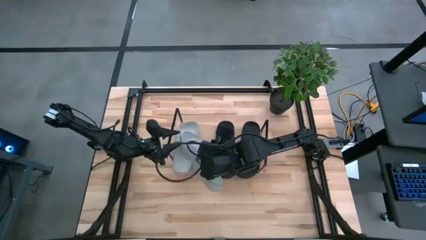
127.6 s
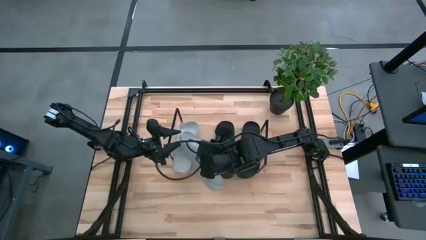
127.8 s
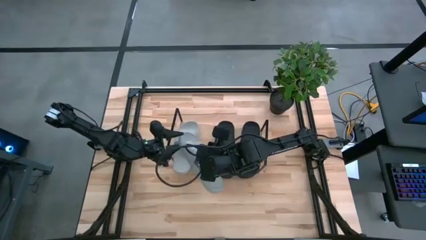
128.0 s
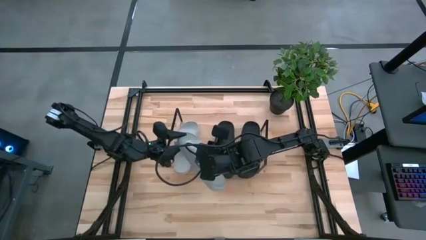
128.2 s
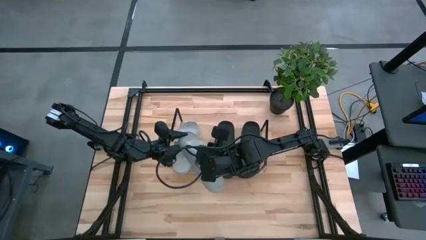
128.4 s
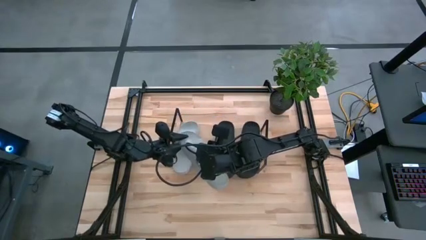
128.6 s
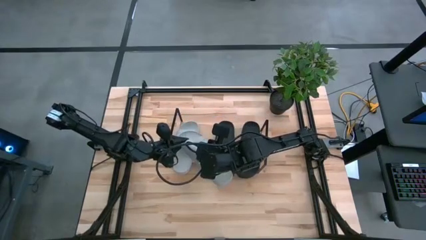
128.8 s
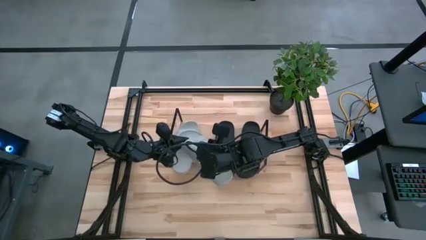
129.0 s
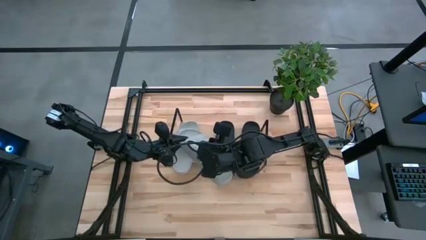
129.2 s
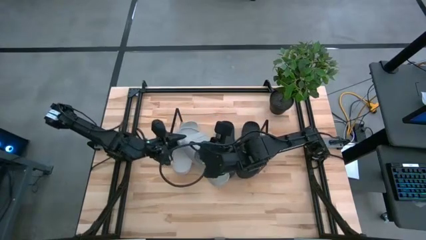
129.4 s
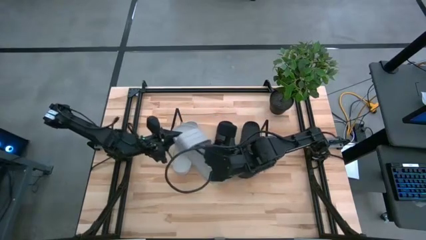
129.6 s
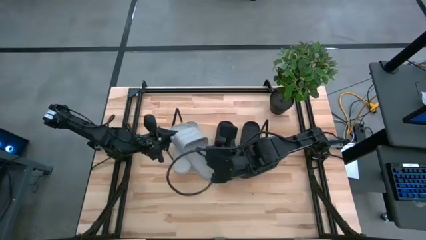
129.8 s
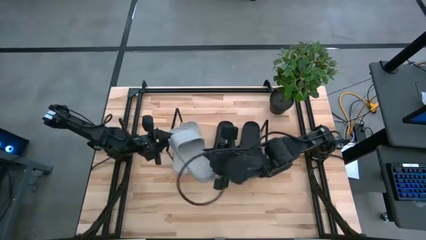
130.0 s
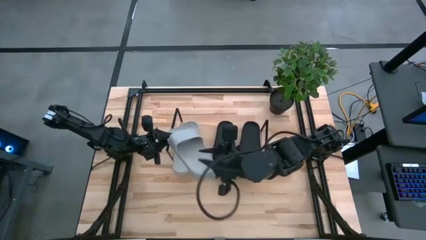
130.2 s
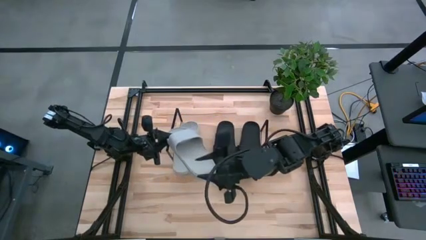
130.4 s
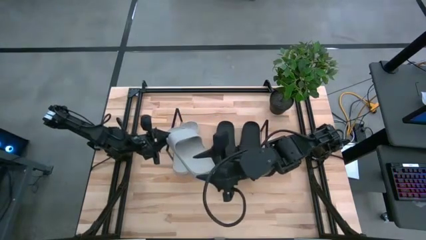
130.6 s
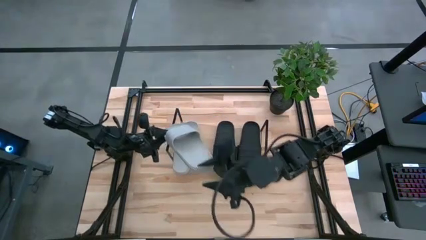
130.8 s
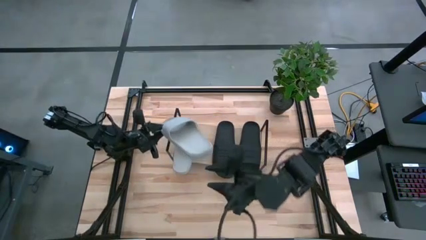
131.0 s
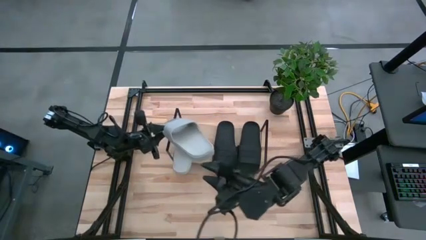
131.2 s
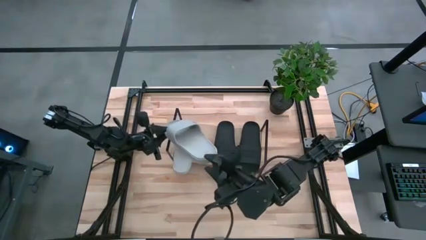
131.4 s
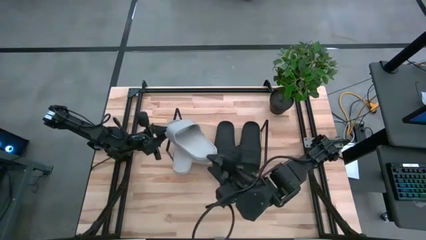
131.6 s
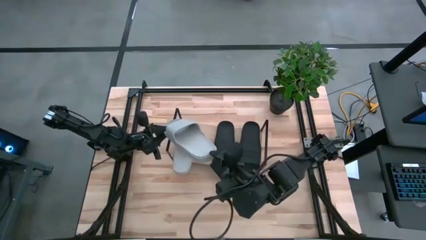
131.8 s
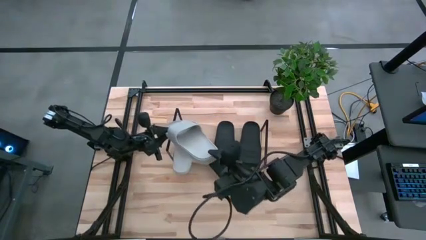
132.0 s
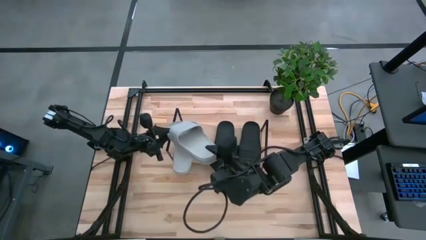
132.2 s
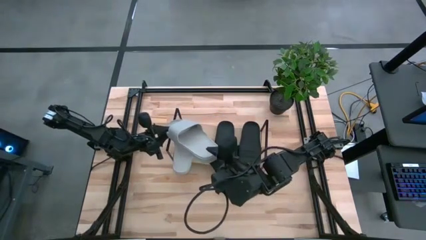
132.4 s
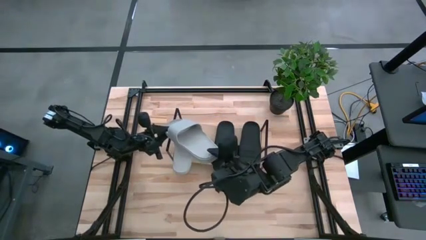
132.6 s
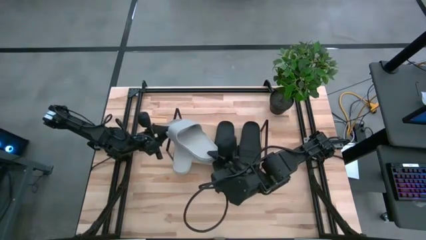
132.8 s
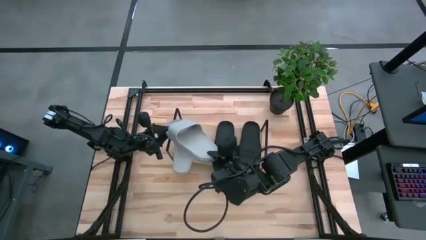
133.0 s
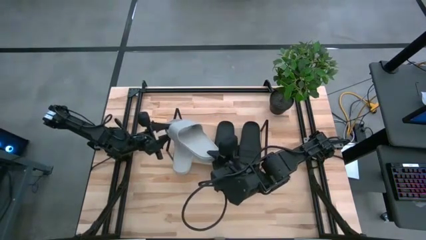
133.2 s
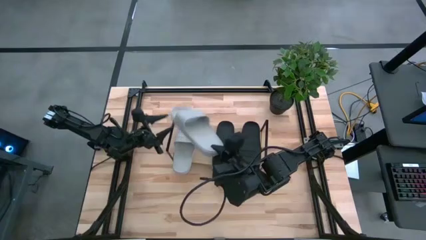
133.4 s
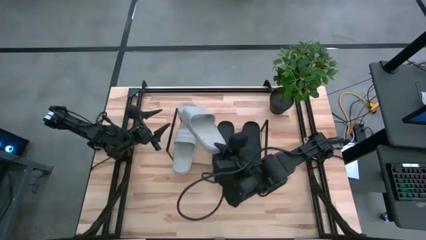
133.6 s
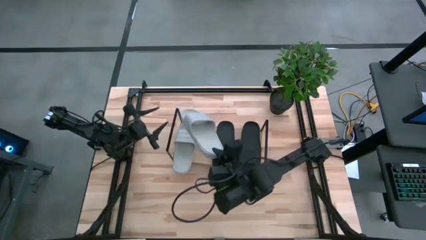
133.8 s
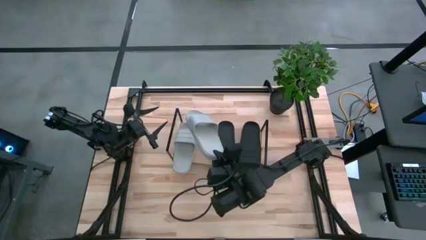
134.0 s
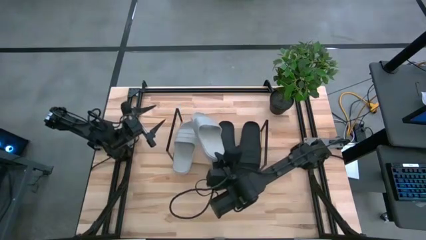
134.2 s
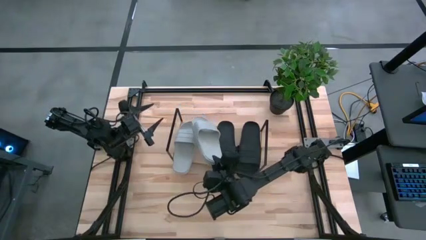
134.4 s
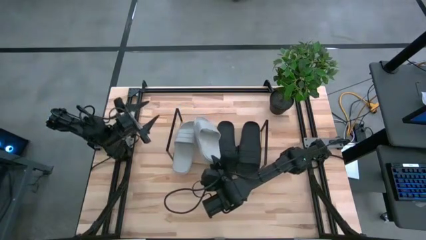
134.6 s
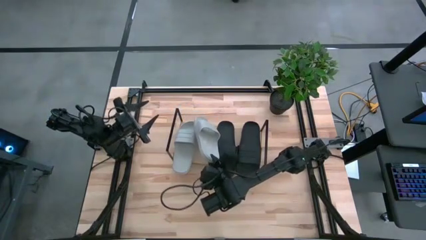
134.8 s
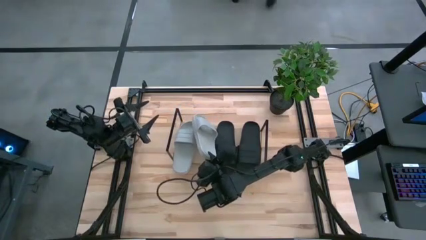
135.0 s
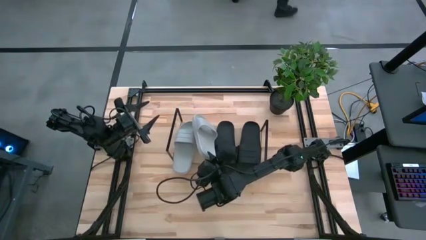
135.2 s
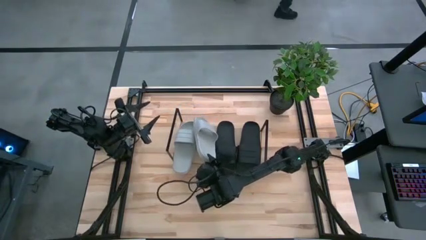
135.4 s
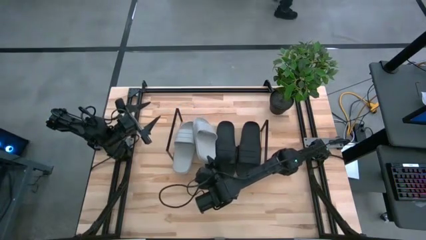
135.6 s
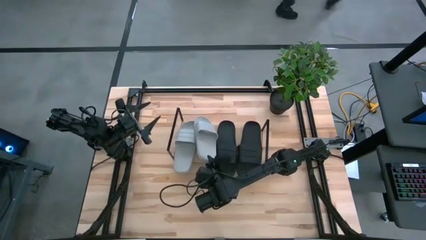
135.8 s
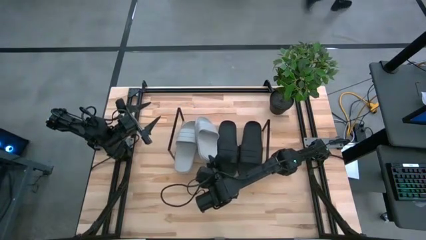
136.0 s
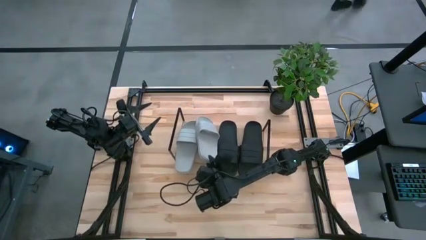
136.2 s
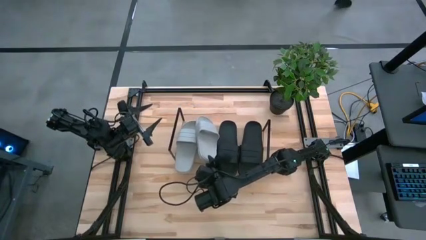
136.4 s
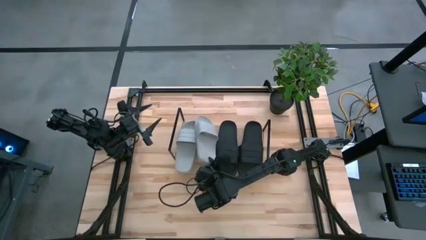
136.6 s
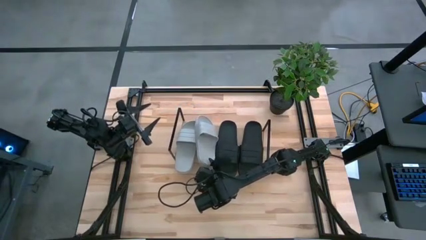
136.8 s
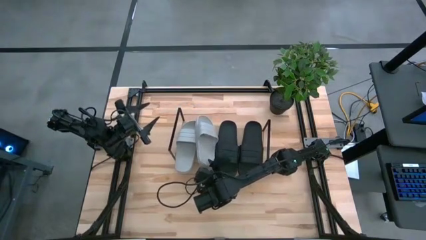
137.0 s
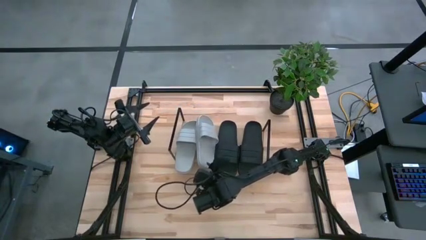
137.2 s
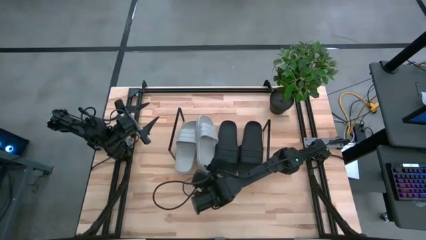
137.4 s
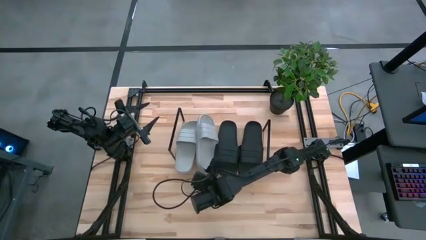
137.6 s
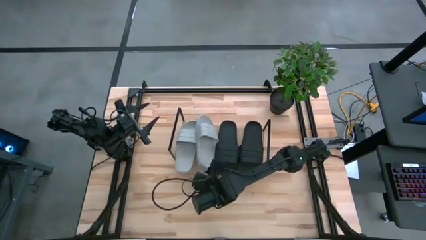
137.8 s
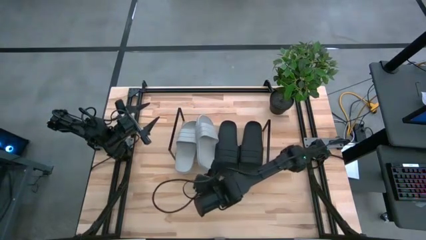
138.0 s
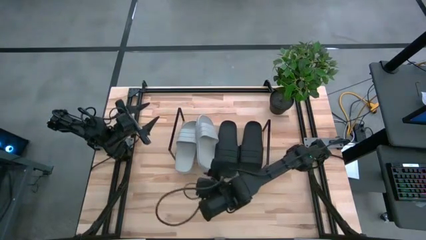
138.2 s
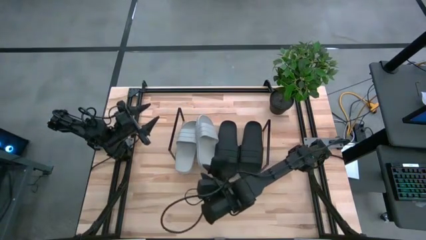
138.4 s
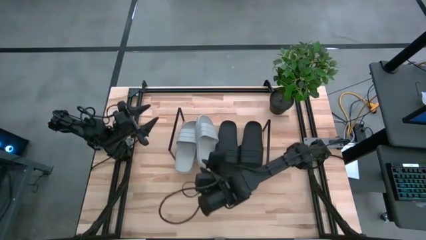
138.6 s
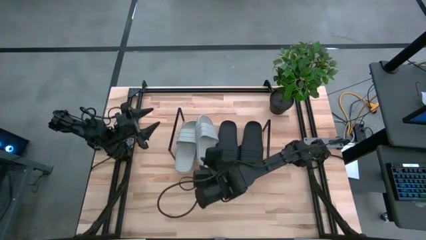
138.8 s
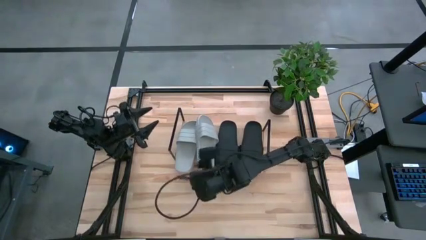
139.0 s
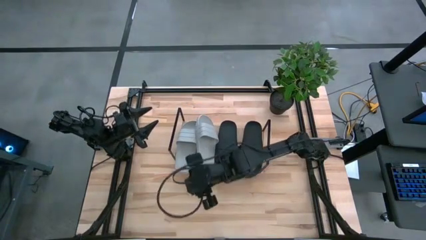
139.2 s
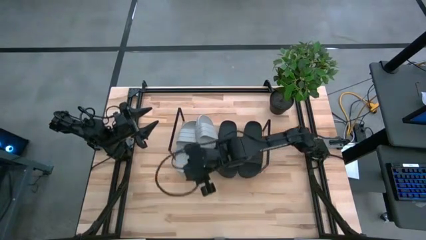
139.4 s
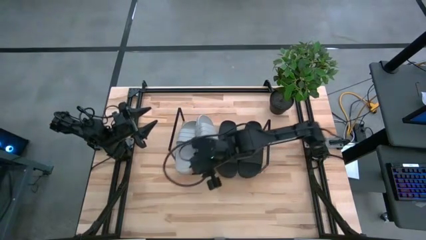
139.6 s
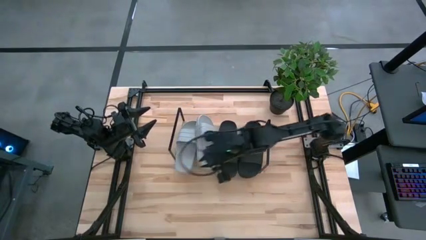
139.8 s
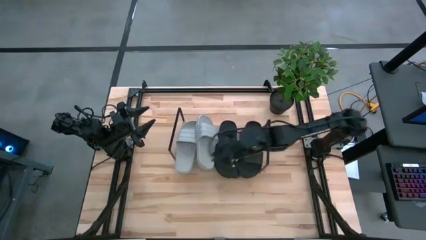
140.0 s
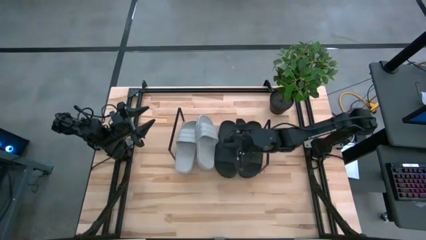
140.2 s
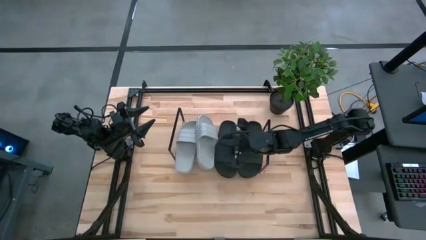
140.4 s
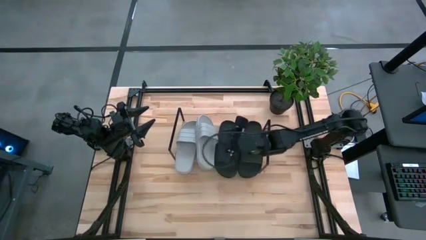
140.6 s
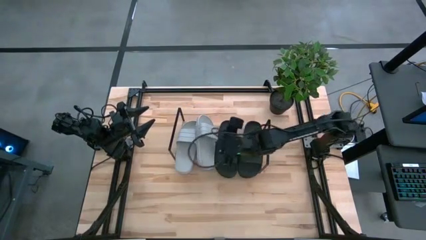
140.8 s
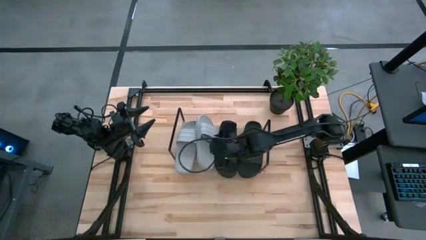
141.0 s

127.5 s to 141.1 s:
Task: Pick and place slides into the shelf
Put the gray slides on the shelf
